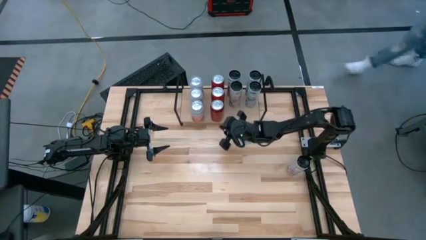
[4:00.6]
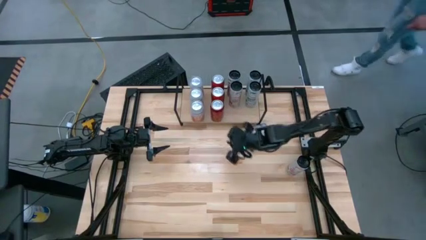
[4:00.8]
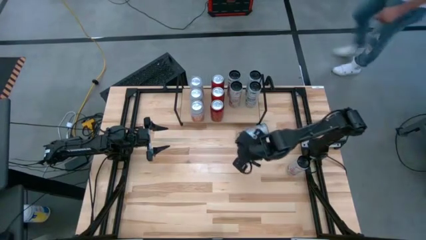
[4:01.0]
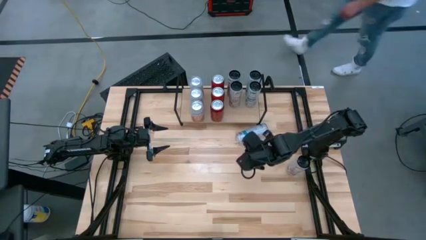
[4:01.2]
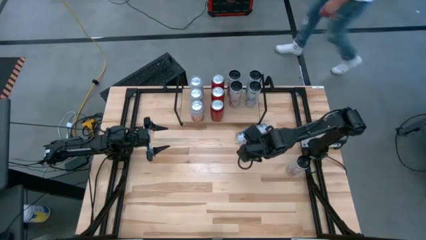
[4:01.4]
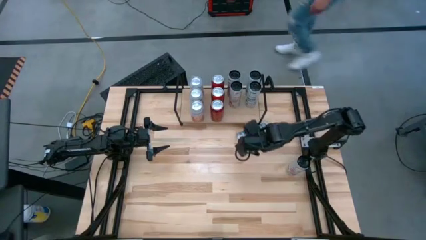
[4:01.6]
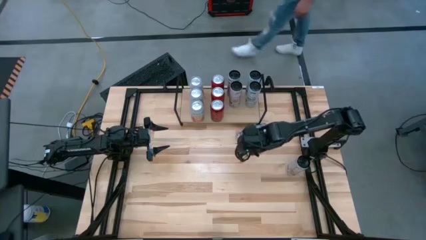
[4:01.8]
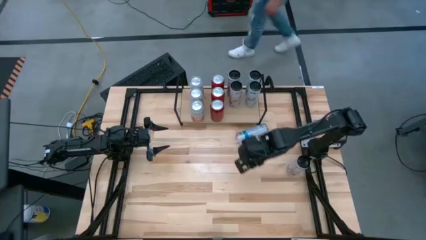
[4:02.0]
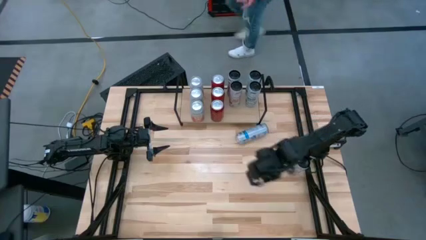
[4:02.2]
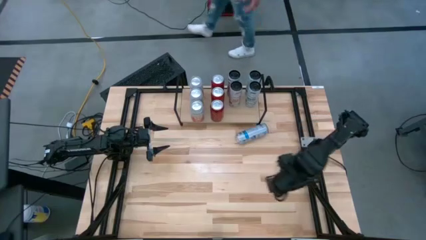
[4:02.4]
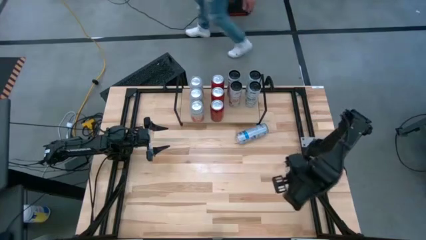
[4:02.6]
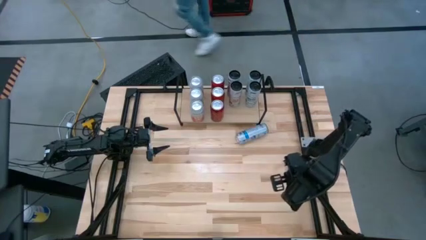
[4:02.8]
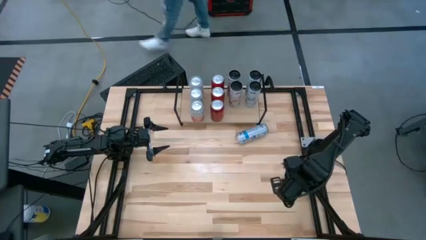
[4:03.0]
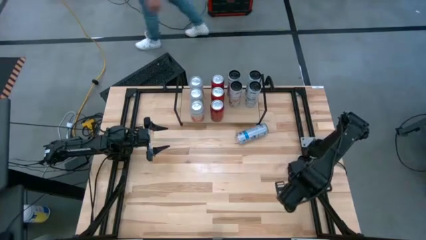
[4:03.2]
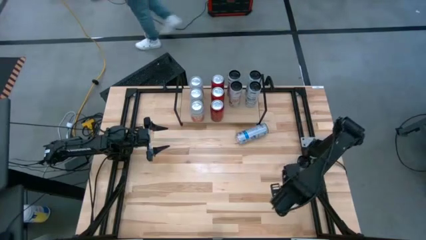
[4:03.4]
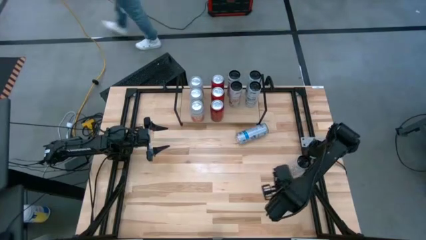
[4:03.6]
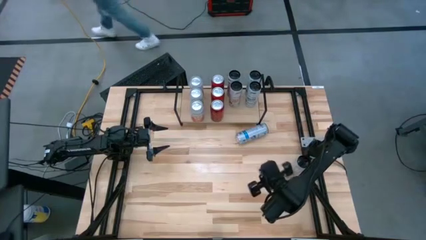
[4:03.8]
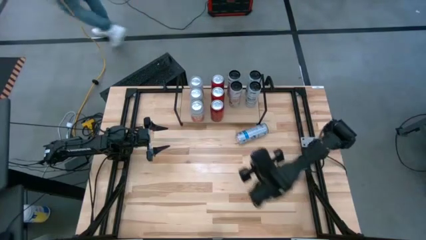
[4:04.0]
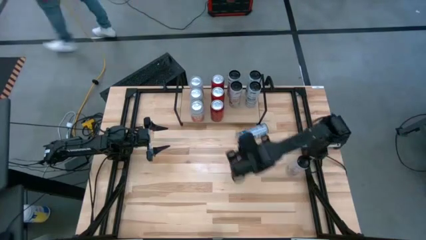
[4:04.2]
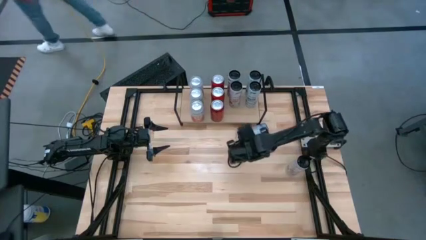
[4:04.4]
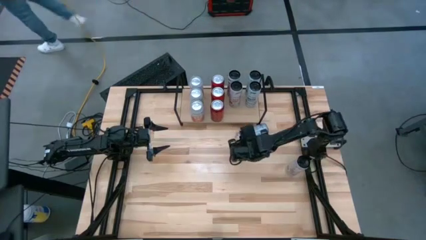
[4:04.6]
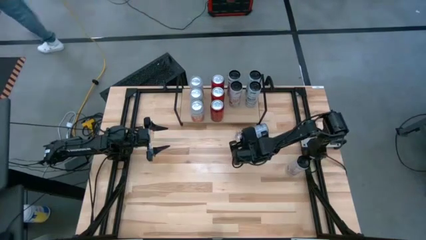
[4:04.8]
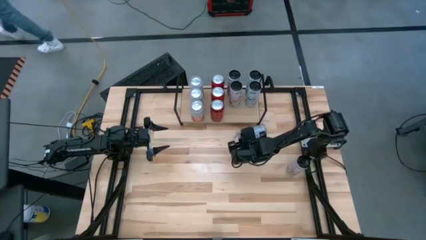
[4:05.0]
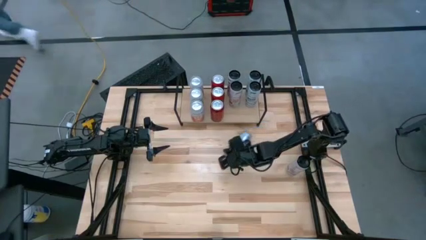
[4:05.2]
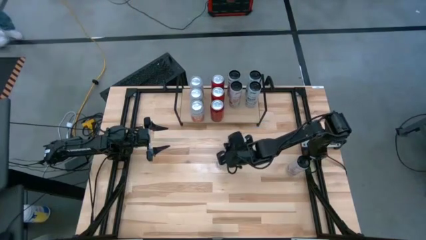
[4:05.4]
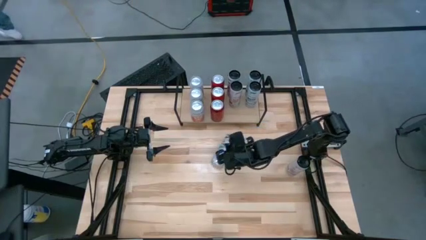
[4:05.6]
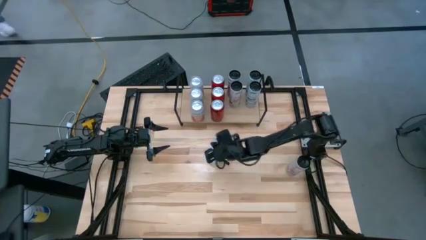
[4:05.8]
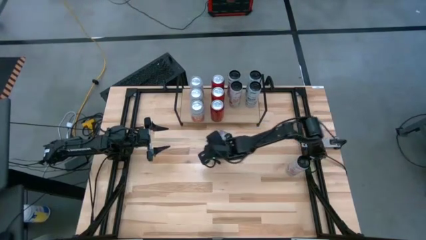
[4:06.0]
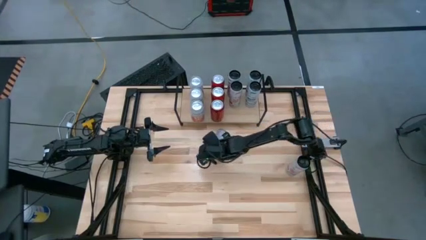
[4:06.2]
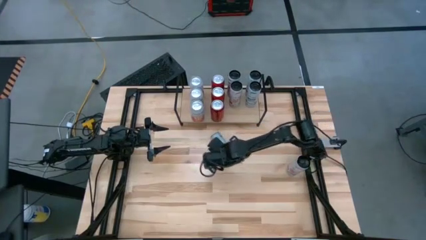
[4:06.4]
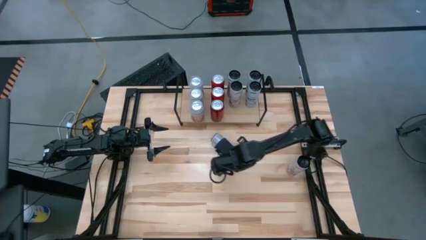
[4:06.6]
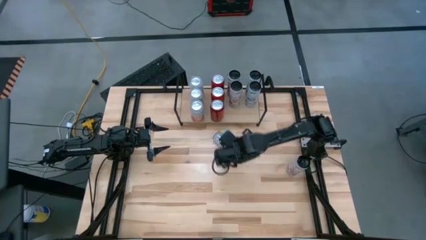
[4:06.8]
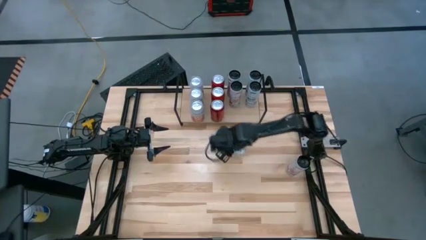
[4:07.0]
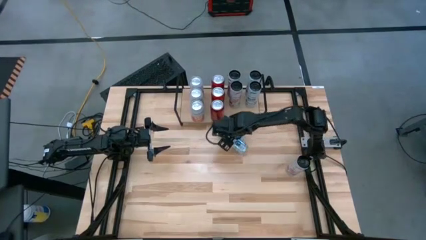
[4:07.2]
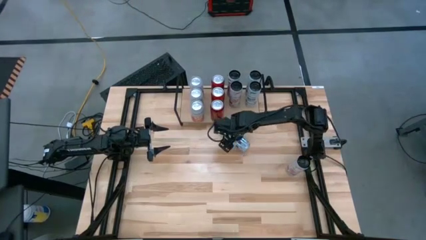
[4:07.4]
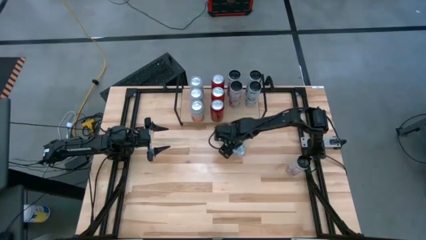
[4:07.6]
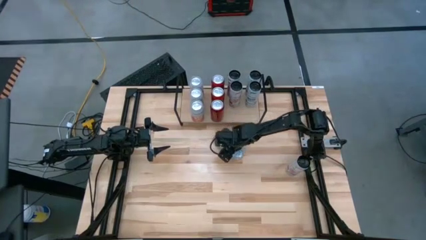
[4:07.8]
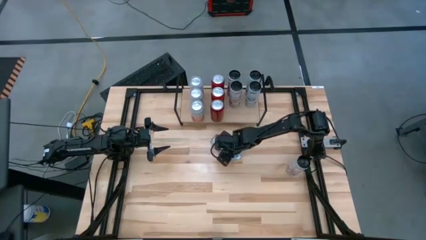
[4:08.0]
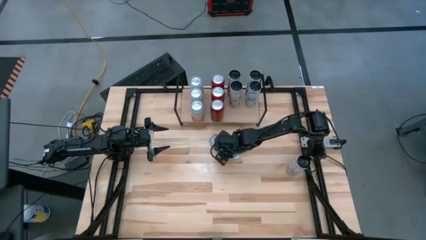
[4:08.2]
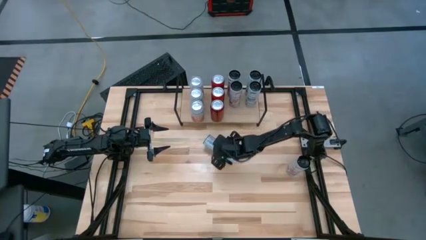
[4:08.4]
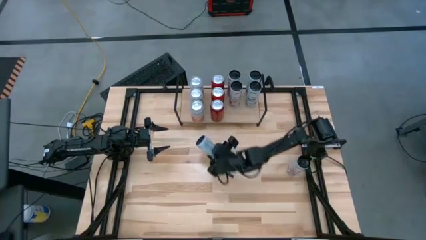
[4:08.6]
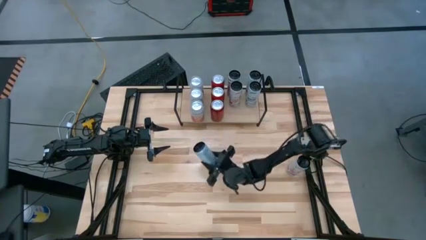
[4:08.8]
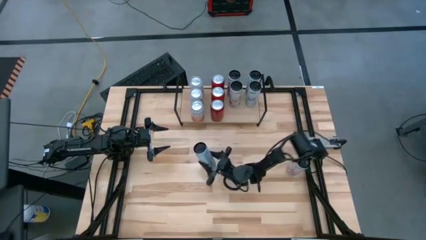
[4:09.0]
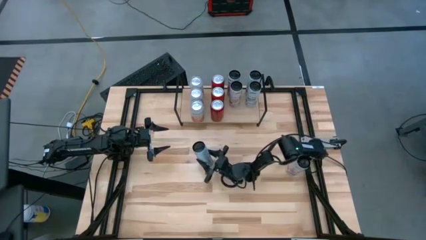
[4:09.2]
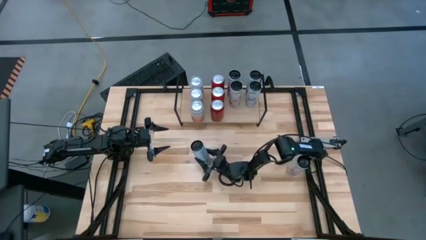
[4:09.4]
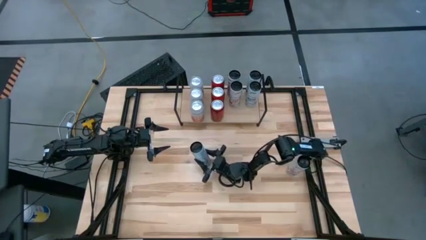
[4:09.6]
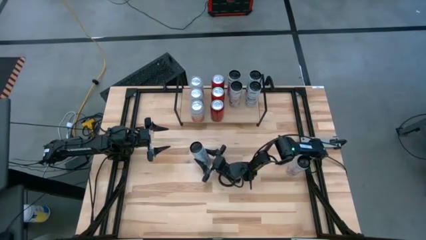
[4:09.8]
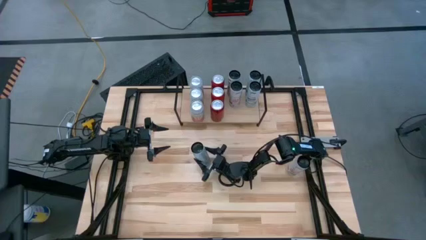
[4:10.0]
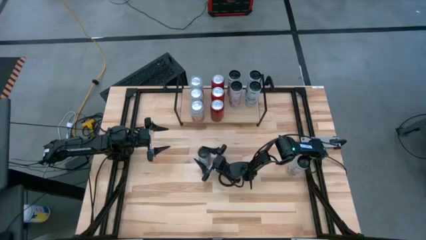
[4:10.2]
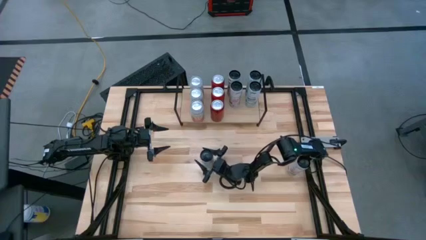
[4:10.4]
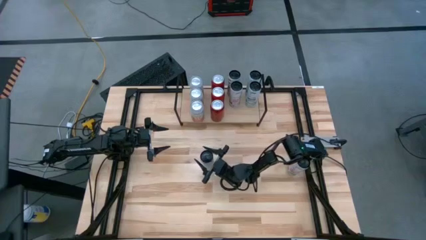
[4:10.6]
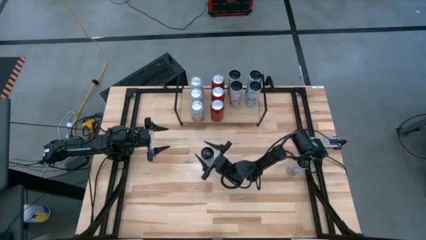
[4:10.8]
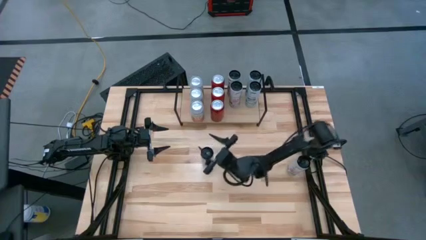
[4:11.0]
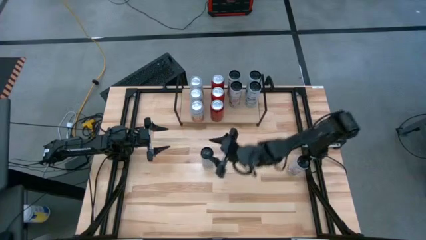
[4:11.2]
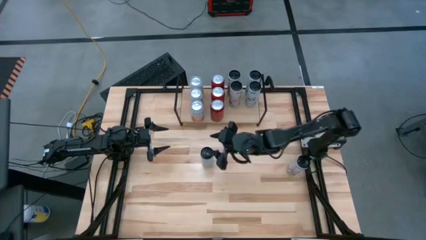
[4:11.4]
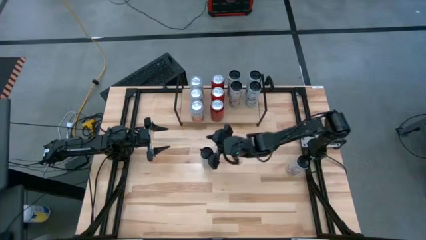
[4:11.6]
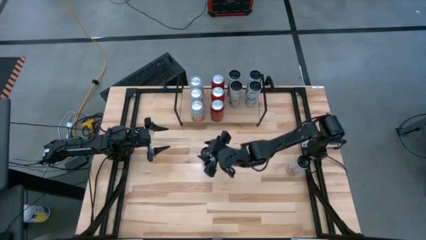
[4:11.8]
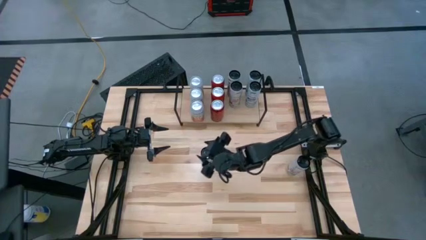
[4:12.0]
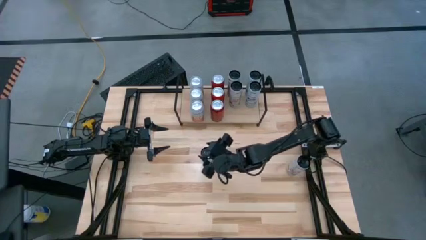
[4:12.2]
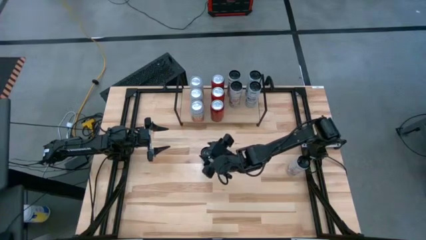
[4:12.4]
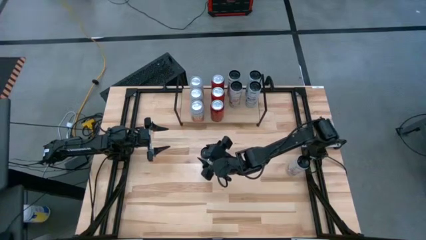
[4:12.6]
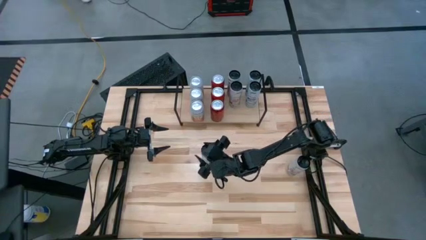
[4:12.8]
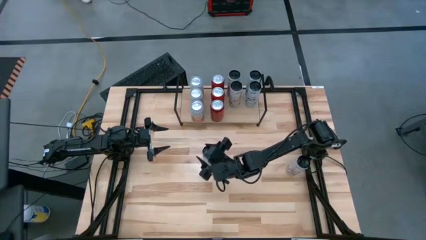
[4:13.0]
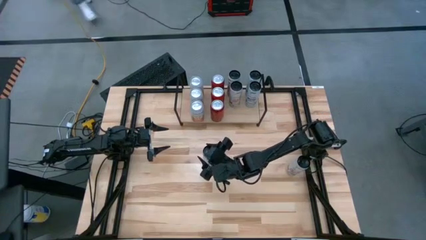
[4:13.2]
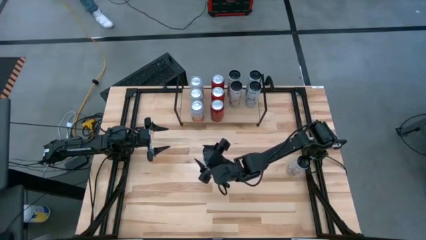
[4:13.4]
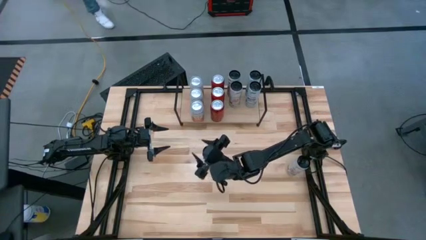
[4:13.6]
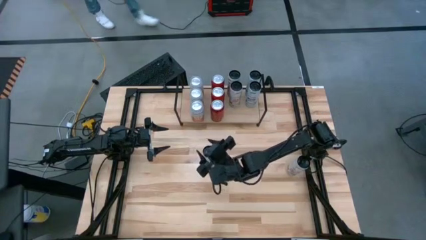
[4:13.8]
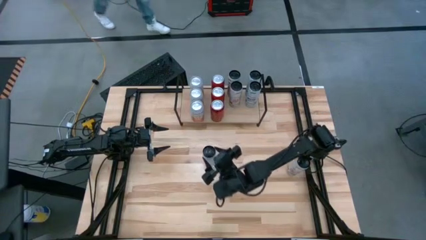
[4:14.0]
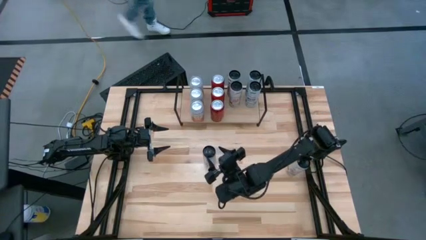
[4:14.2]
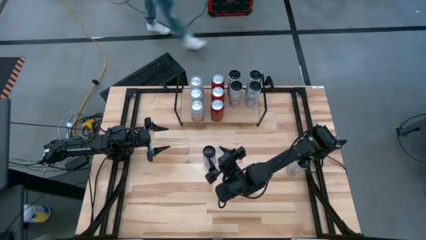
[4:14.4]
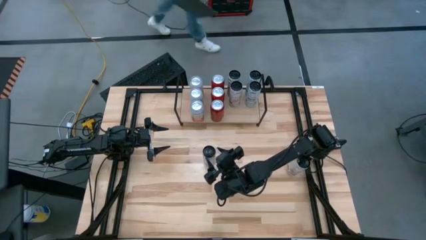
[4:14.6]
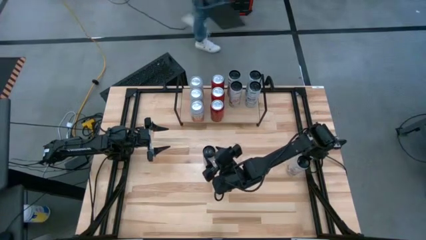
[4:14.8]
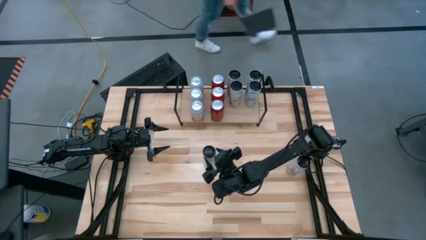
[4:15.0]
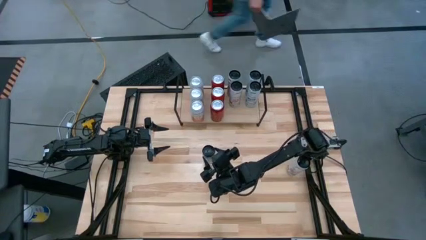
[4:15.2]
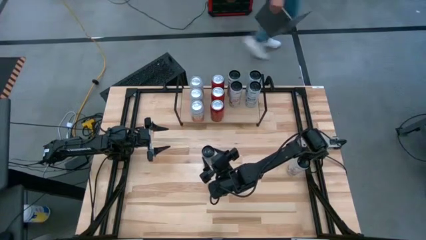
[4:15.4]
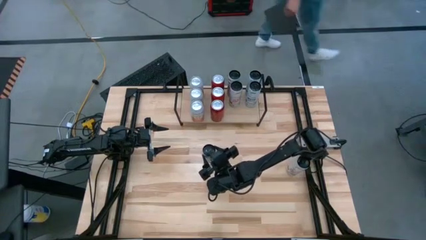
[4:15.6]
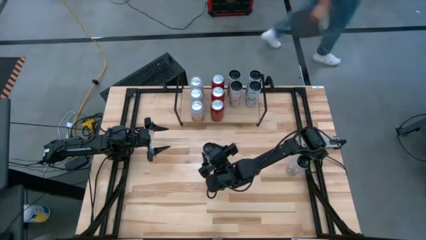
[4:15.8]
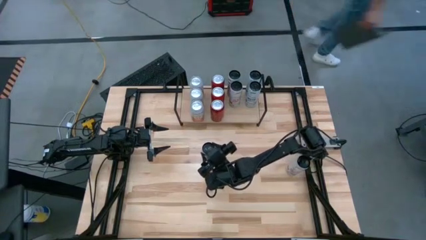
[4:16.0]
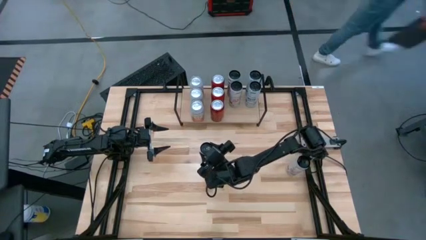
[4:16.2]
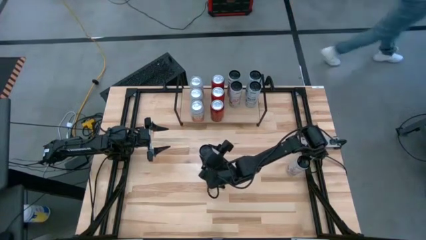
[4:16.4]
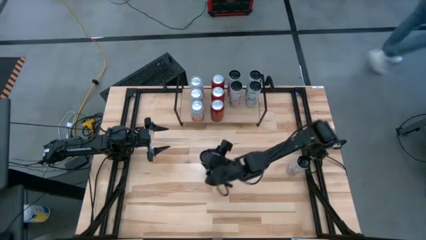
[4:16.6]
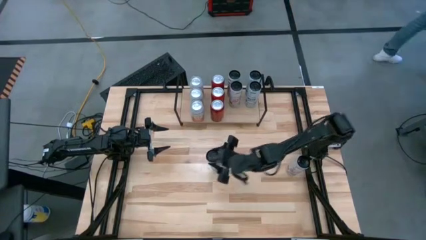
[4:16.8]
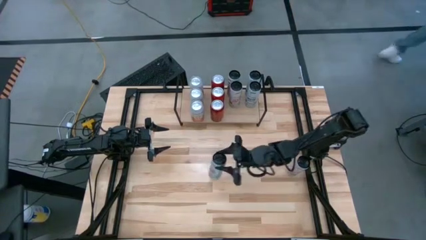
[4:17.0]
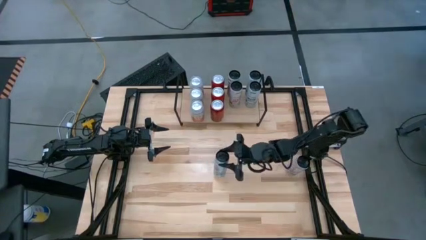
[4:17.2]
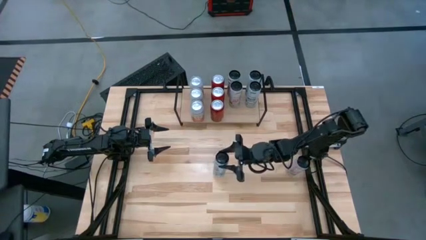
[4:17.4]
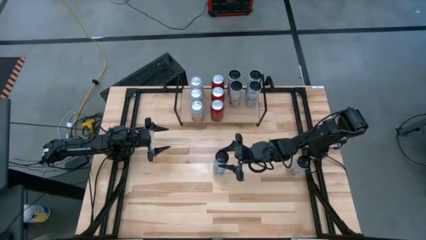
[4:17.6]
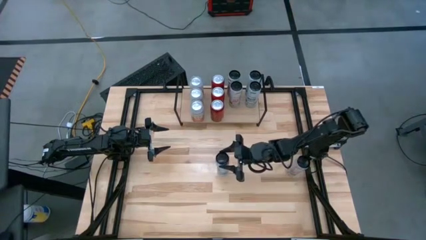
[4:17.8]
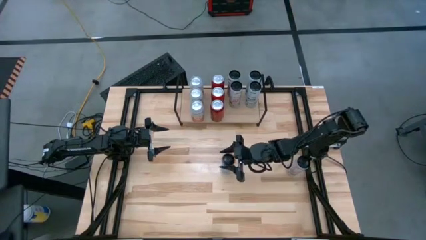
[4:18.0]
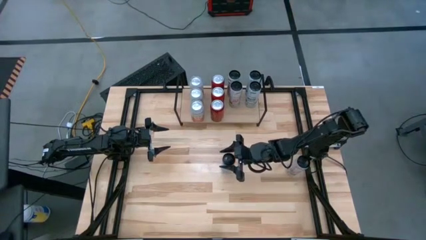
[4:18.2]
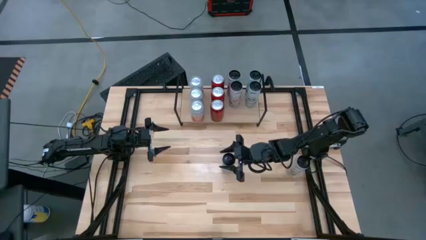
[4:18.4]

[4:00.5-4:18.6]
Task: Place canned beverage on shelf
Adjust the white blue soda can
